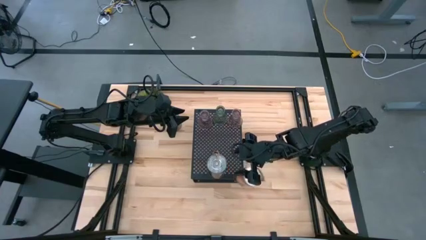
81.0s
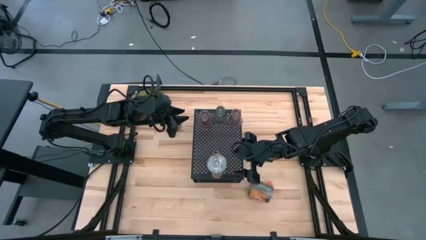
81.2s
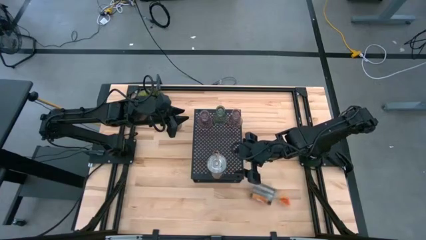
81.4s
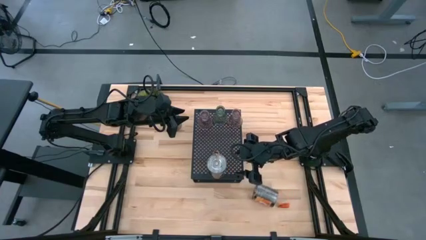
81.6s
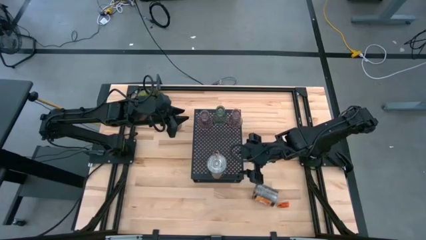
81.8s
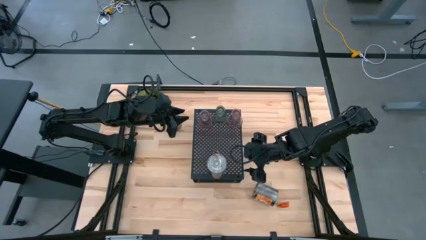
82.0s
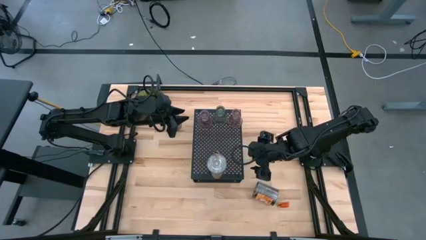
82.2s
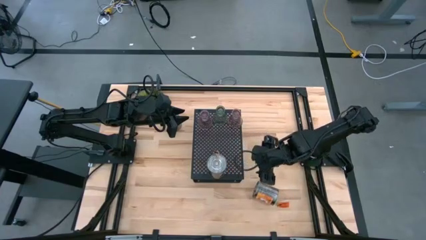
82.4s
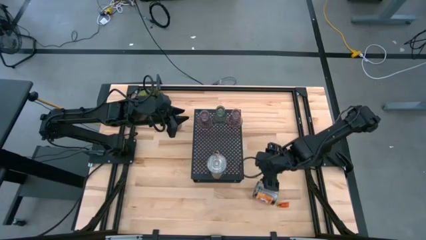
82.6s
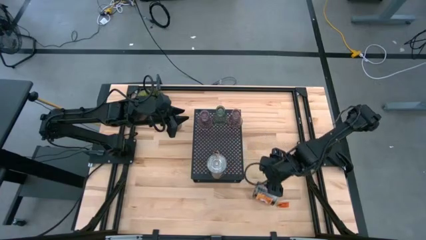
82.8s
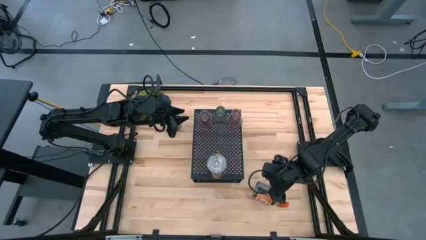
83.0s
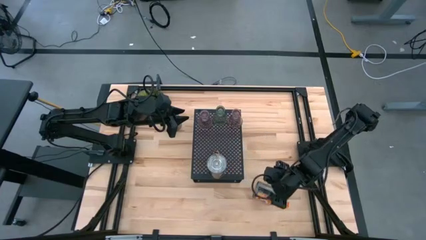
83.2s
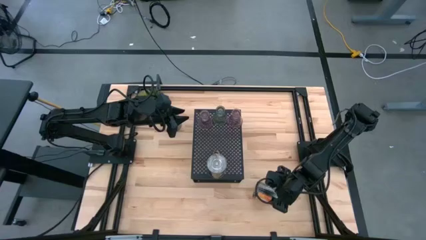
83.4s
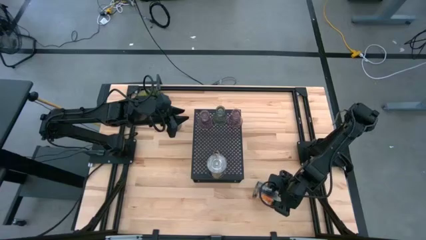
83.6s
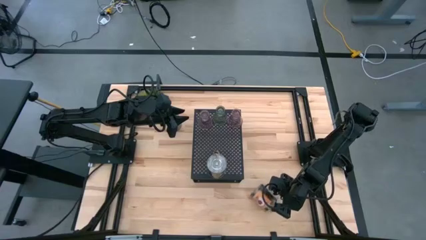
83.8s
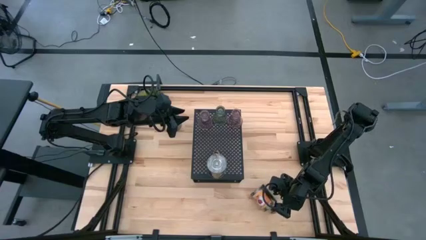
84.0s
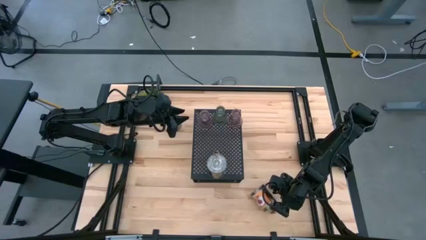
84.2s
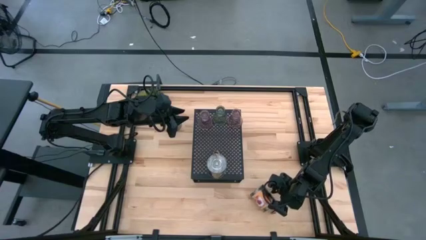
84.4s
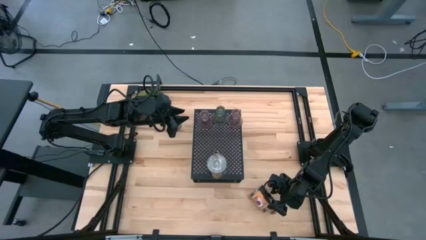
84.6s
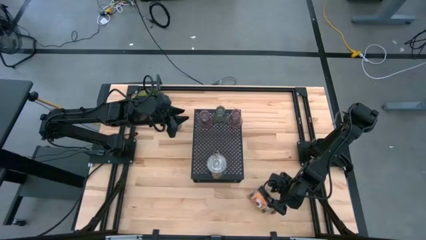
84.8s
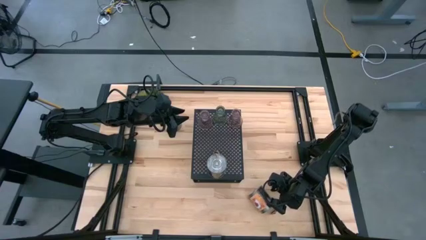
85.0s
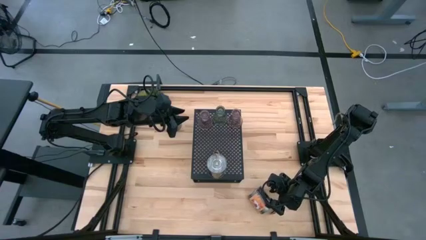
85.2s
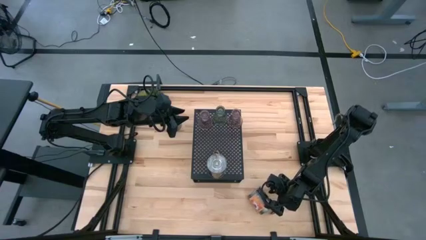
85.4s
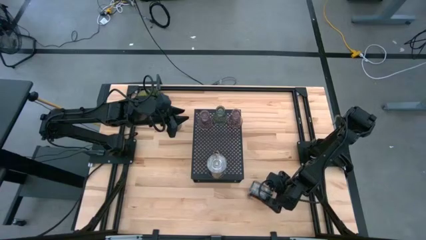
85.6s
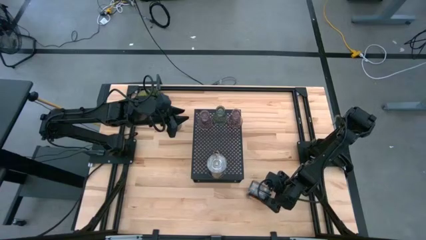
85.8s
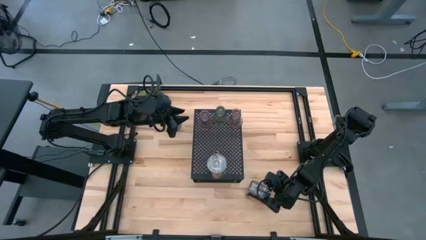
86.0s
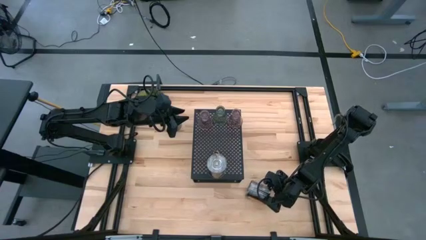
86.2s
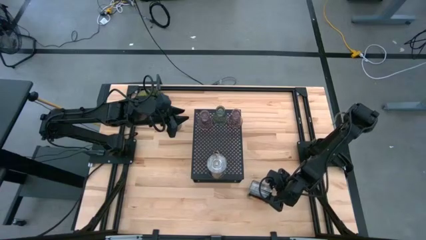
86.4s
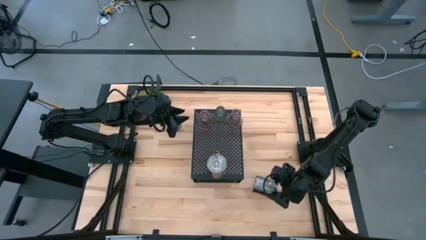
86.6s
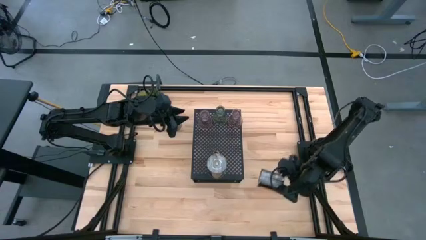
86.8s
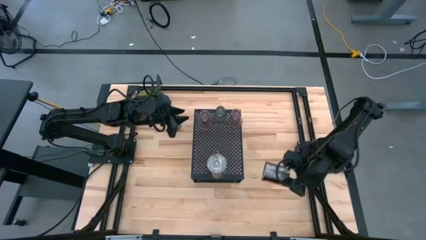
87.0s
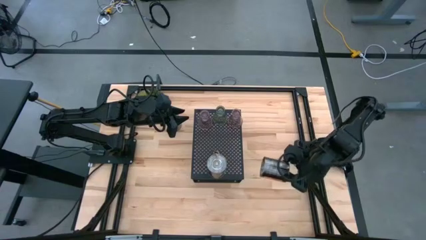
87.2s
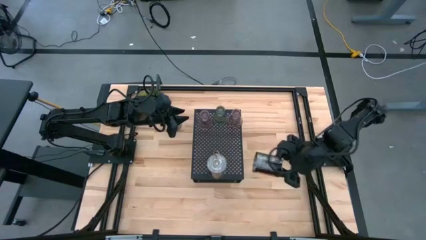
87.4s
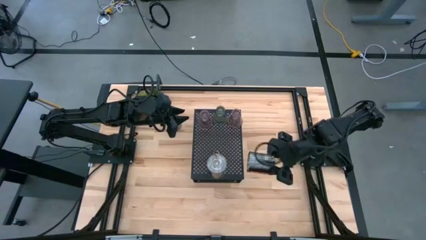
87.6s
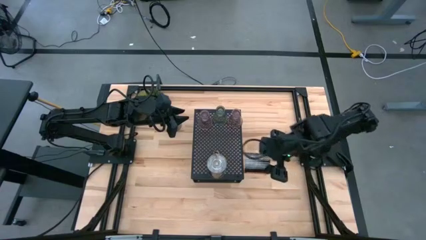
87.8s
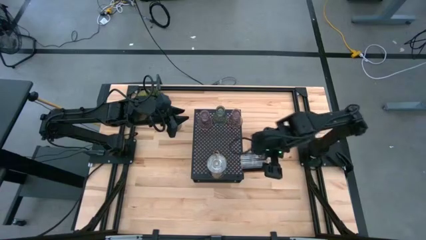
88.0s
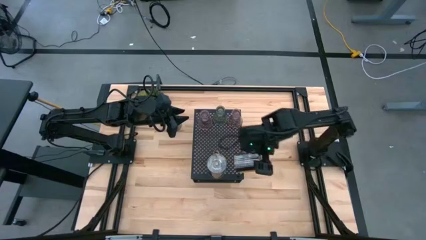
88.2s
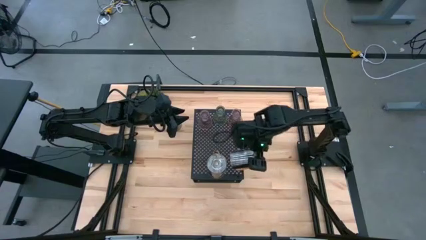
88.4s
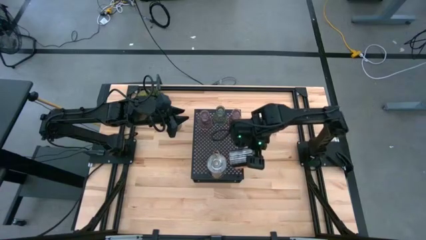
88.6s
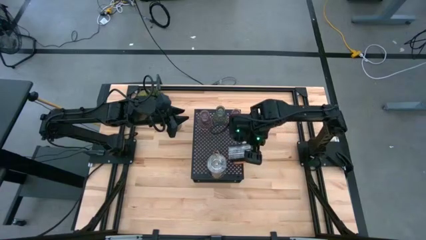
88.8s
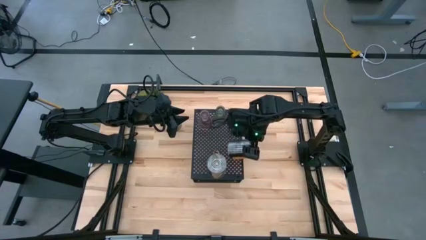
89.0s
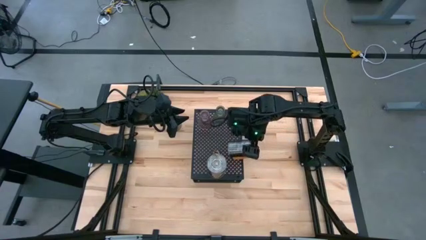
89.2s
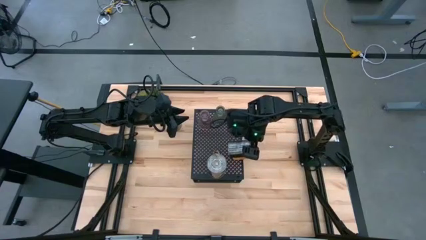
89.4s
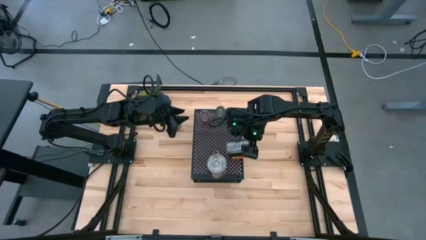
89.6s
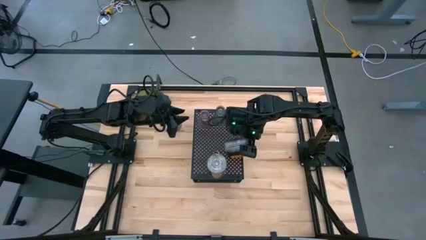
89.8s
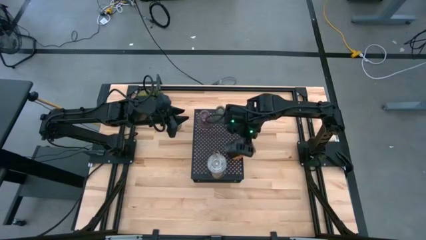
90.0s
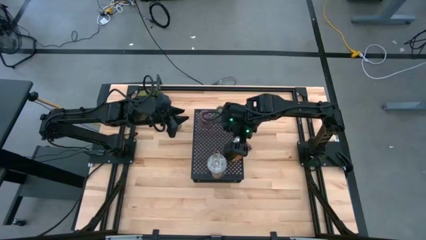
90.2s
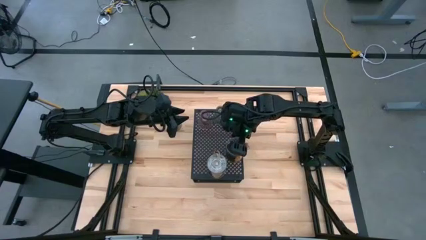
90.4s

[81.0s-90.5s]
Task: Pick & Place candle stick holders
Put the orange scented candle on the shelf

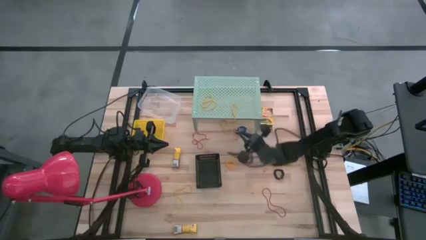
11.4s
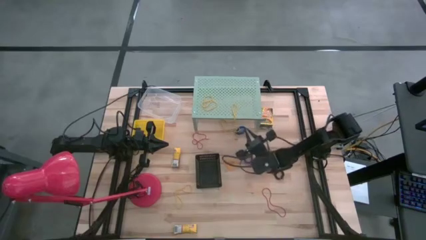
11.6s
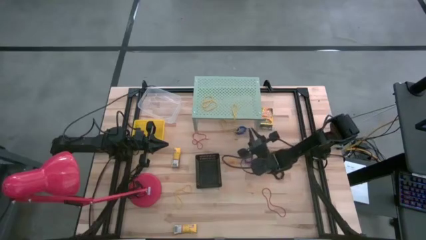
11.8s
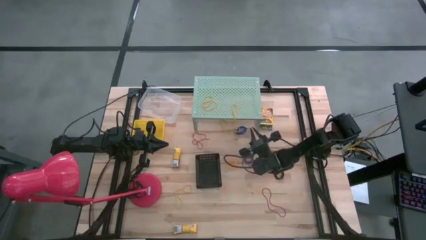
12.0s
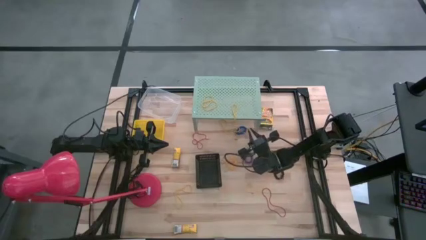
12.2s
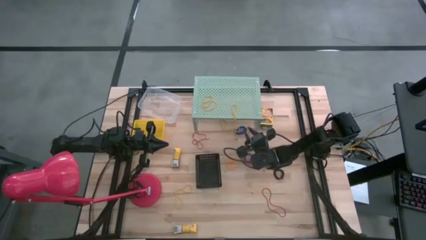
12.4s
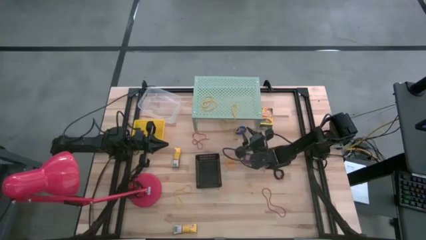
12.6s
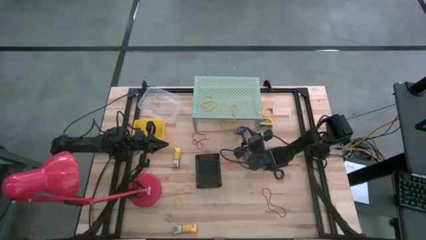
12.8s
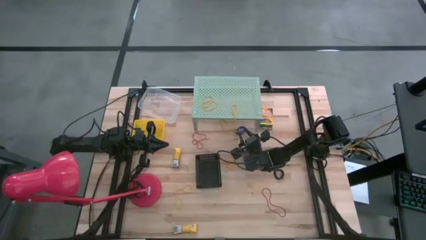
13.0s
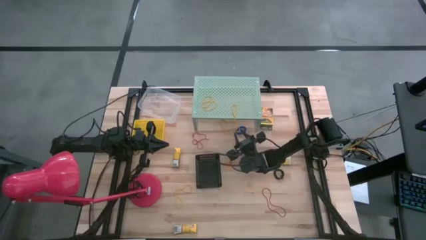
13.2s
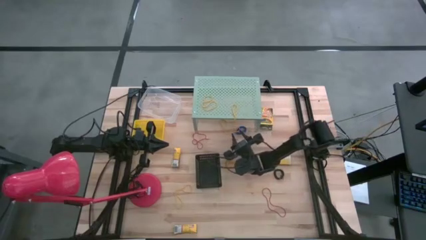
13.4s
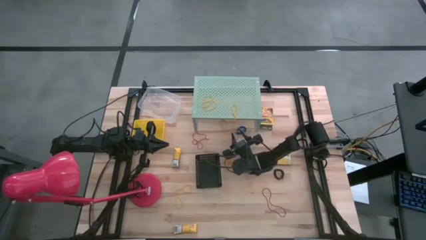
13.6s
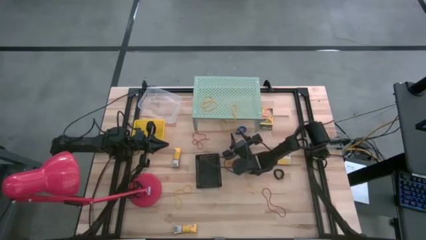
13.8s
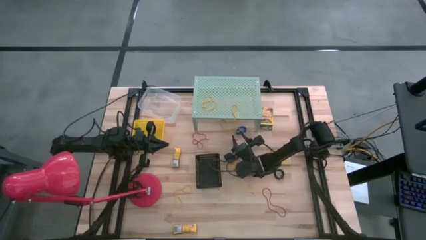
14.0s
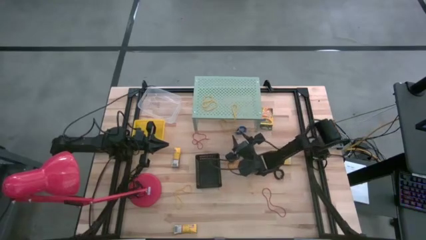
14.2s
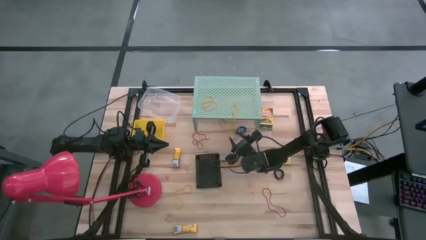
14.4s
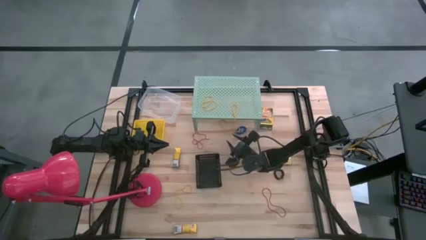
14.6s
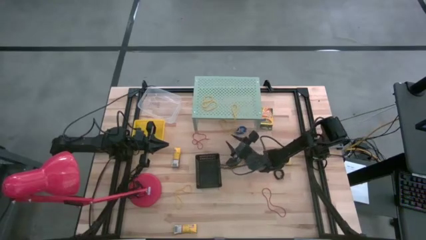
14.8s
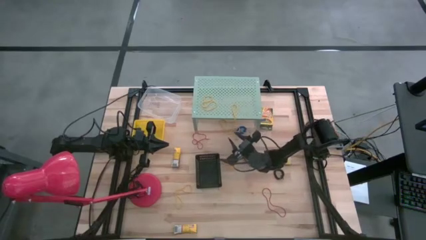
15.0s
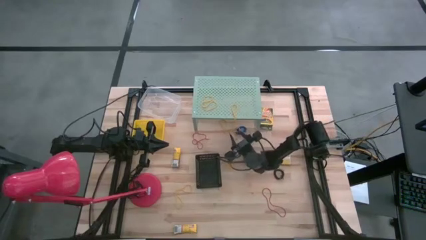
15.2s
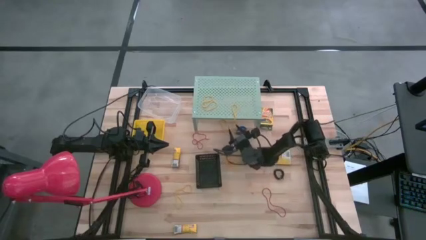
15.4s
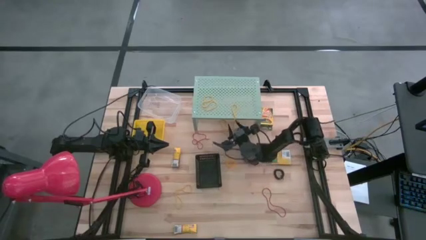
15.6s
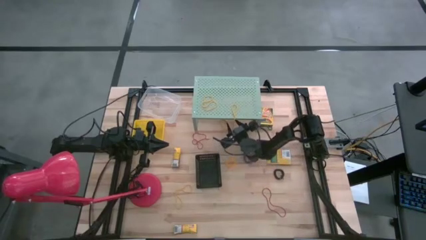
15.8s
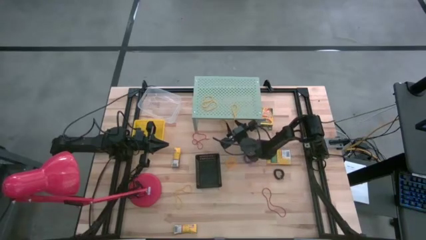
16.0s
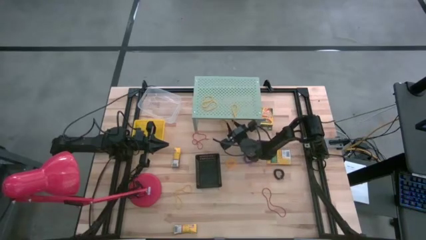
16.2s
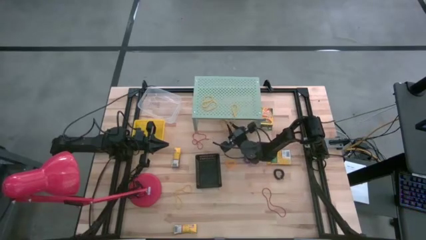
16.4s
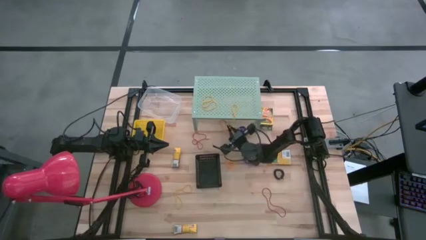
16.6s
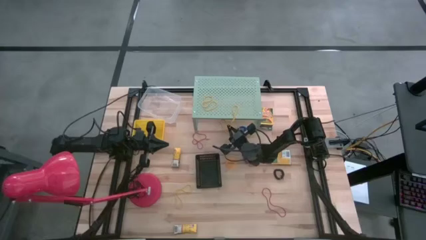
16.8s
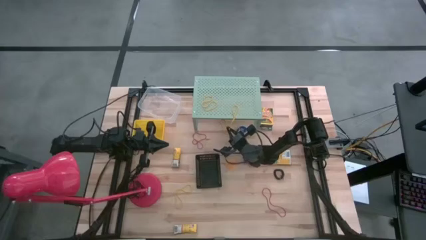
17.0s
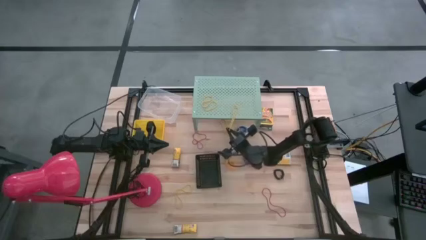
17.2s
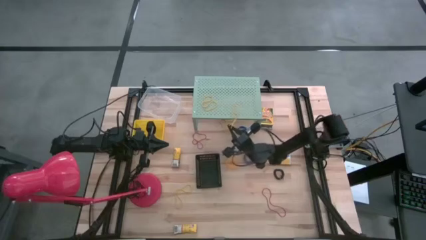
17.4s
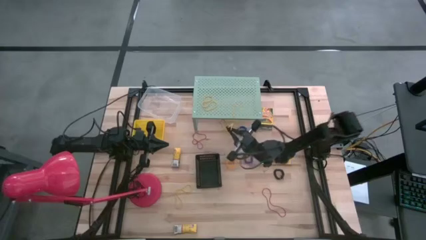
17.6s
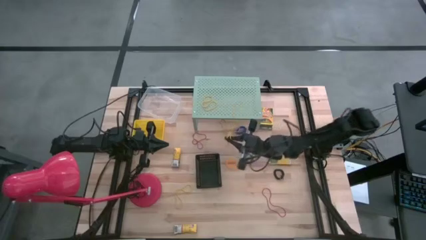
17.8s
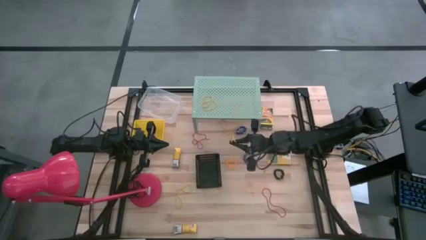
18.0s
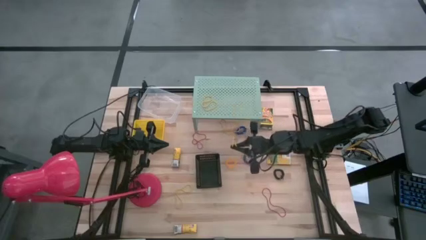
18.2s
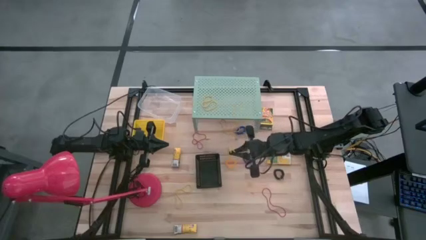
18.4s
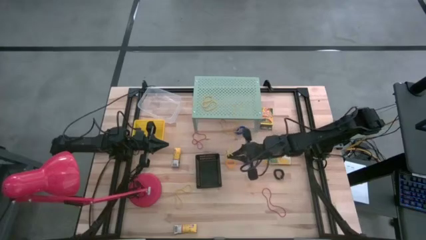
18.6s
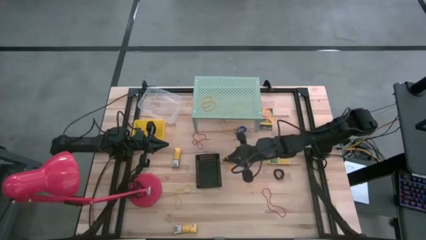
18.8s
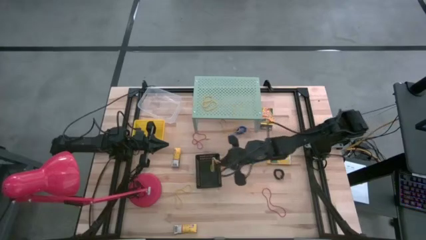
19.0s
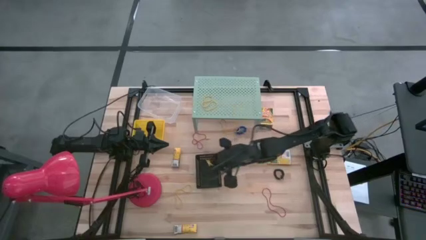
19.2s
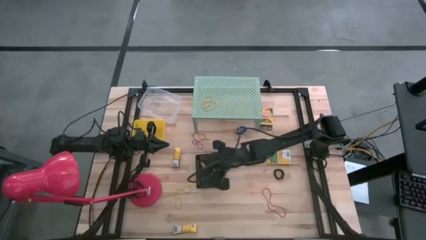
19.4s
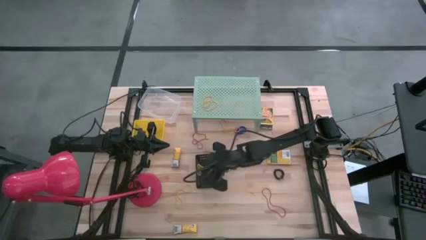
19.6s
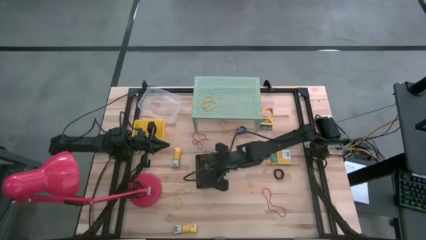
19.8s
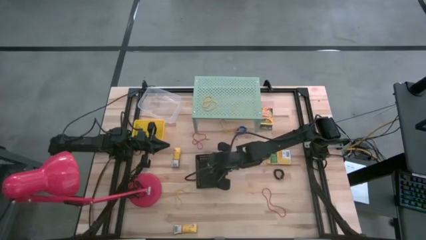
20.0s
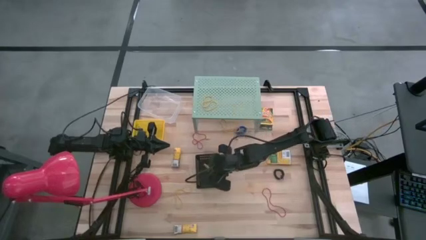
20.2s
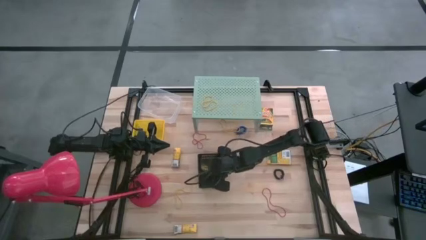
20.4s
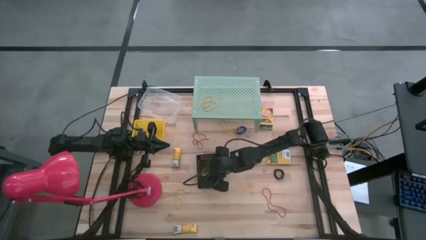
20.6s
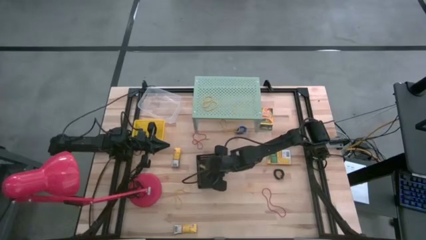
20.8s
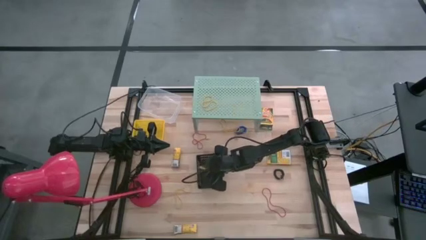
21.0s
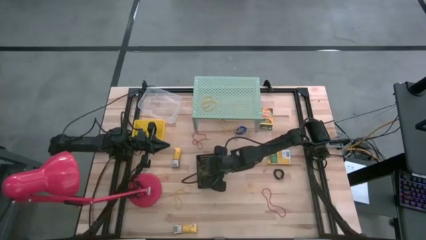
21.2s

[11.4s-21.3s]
Task: Pick & Place Office Desk Supplies
Put the yellow rubber band from the shelf into the black bin
